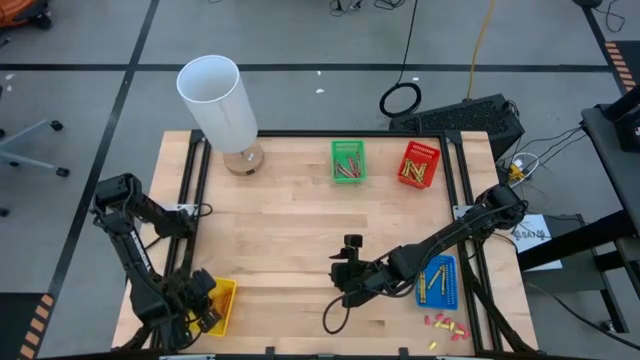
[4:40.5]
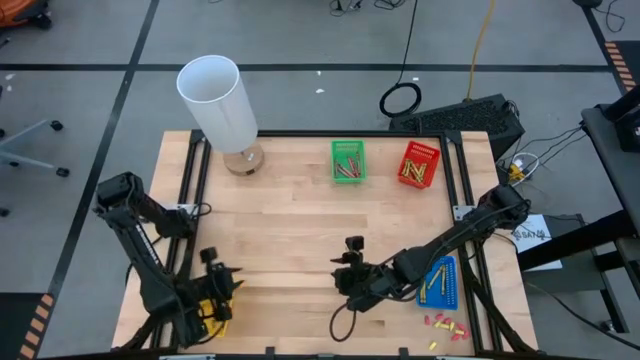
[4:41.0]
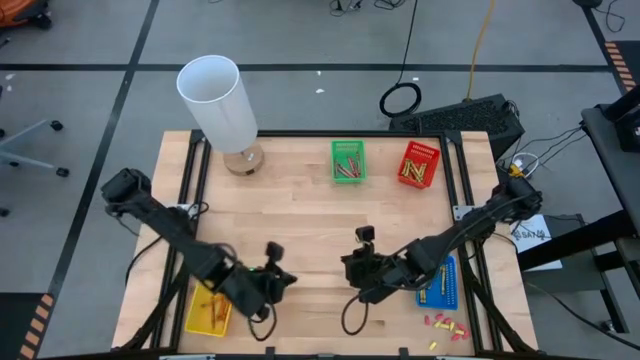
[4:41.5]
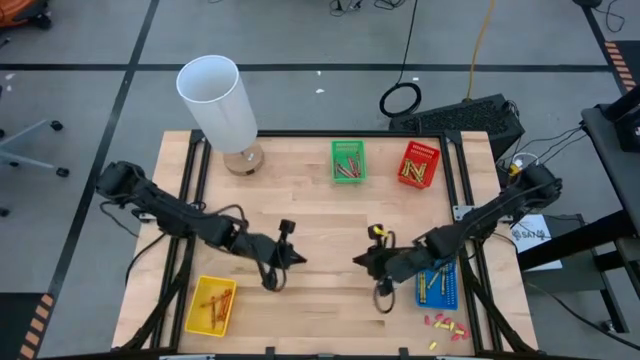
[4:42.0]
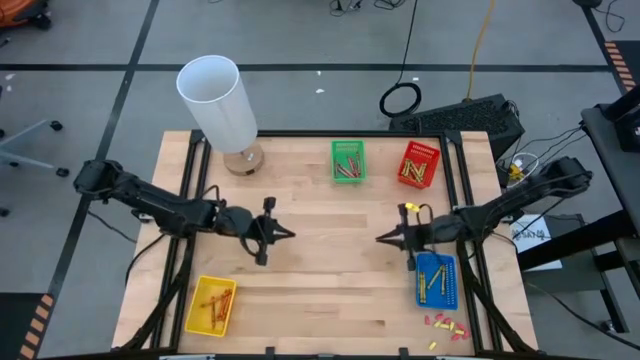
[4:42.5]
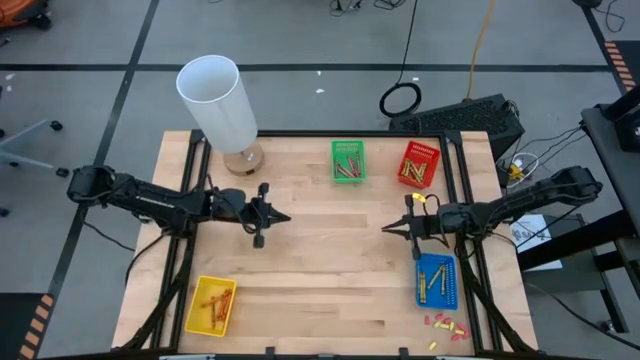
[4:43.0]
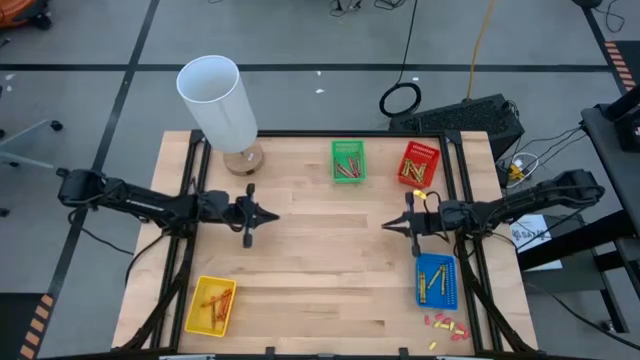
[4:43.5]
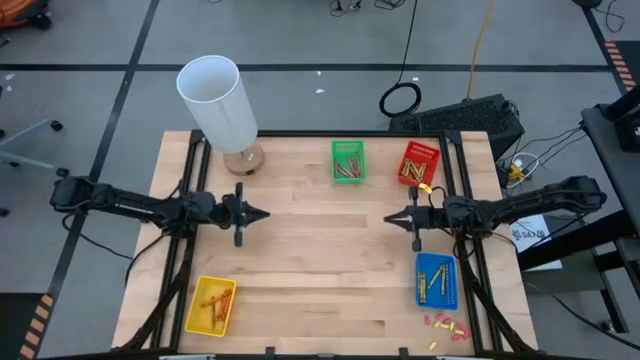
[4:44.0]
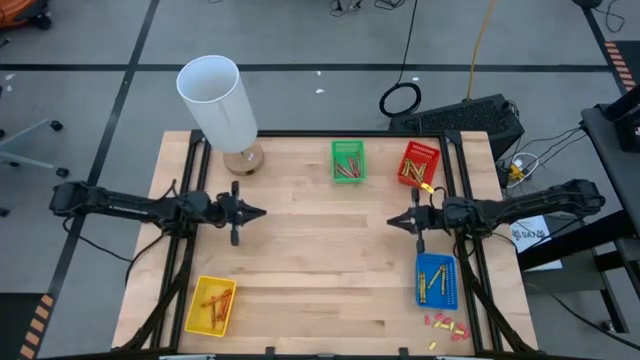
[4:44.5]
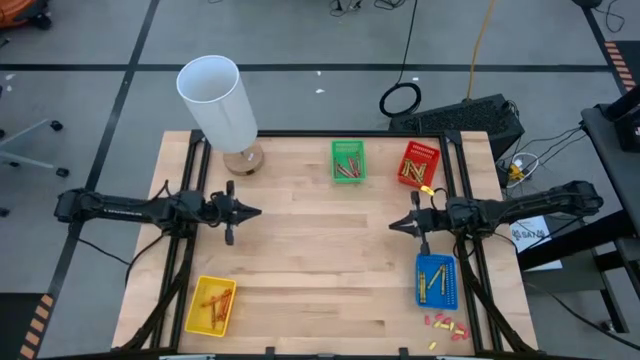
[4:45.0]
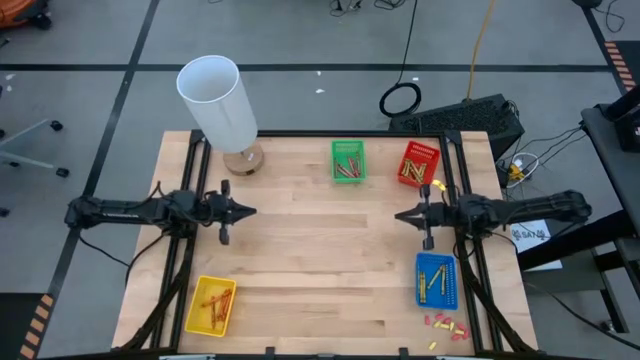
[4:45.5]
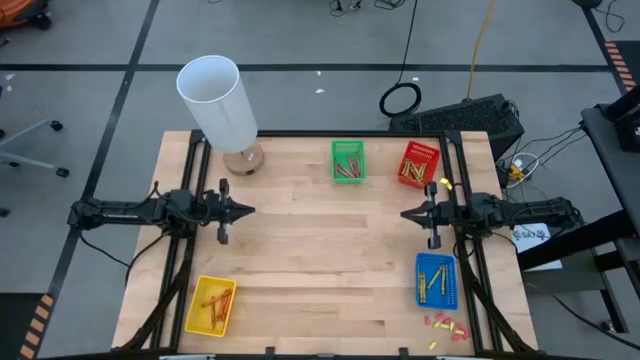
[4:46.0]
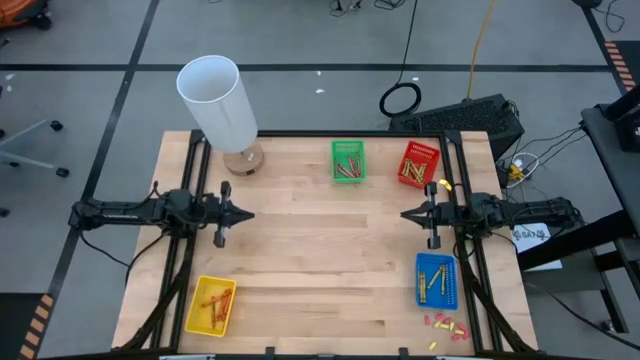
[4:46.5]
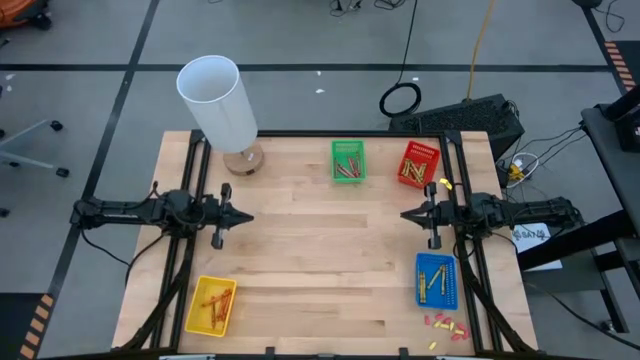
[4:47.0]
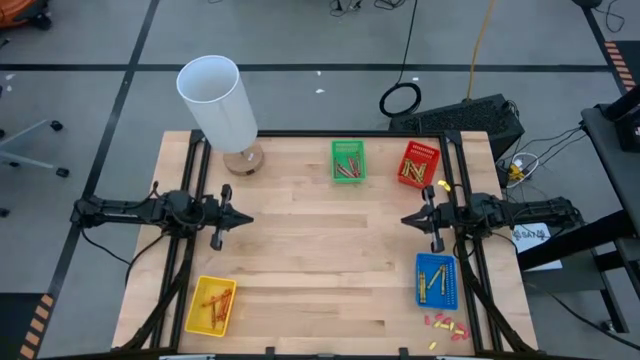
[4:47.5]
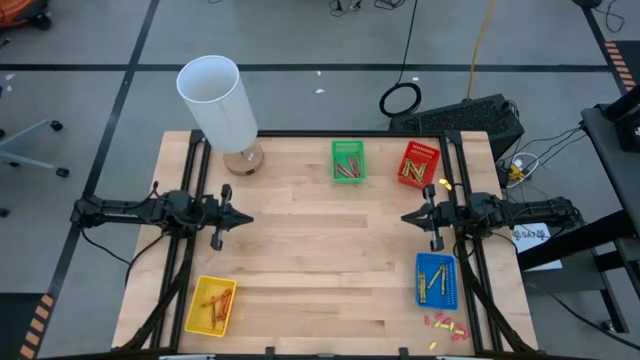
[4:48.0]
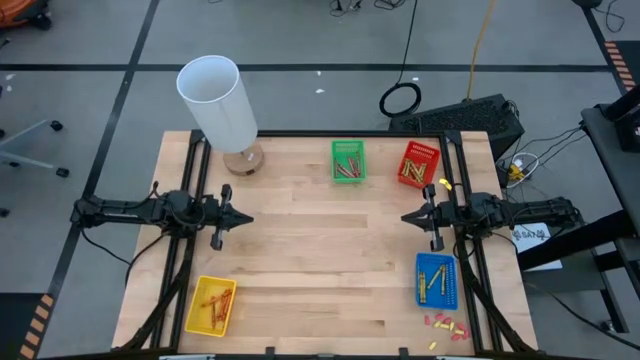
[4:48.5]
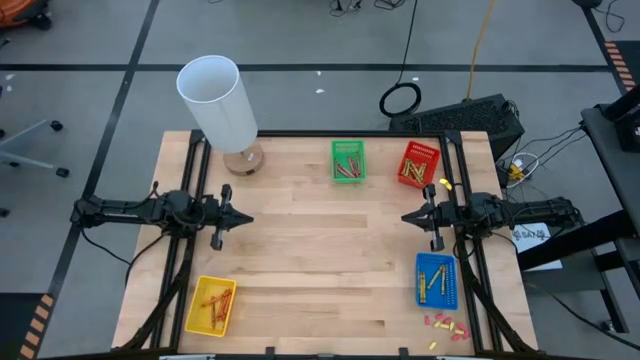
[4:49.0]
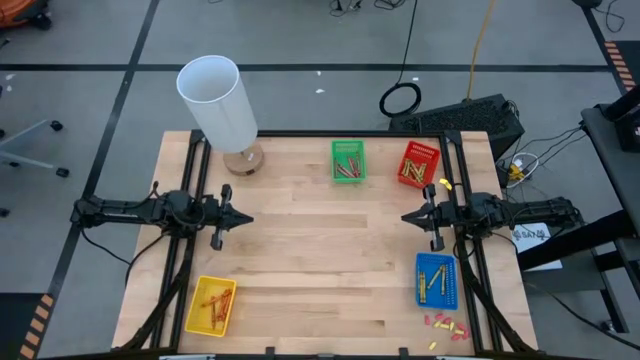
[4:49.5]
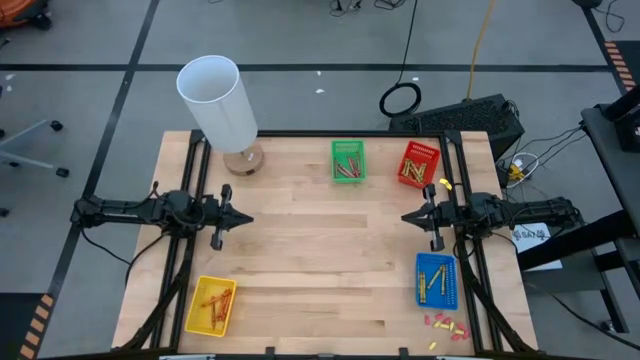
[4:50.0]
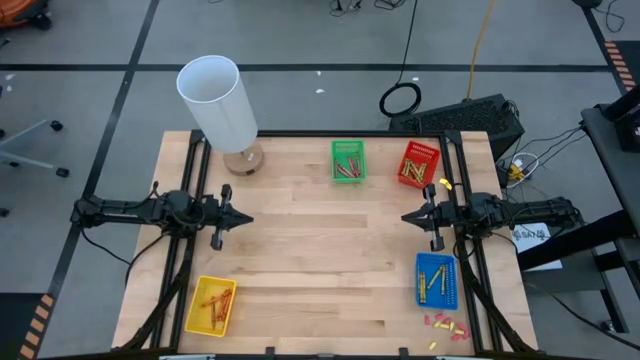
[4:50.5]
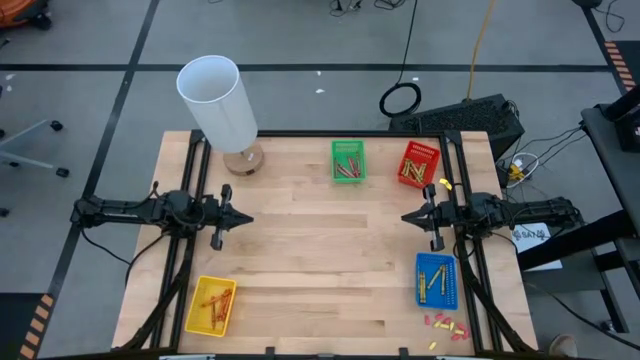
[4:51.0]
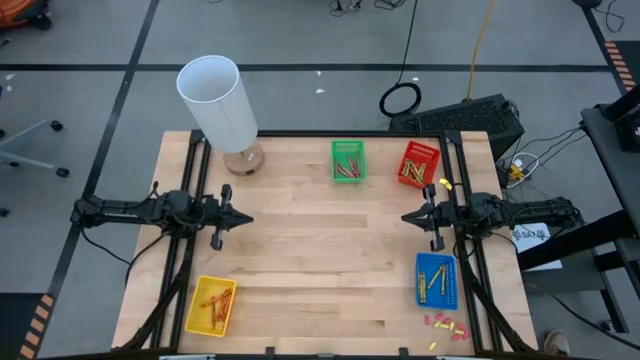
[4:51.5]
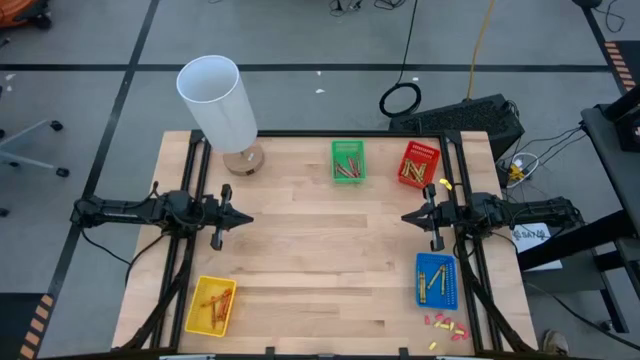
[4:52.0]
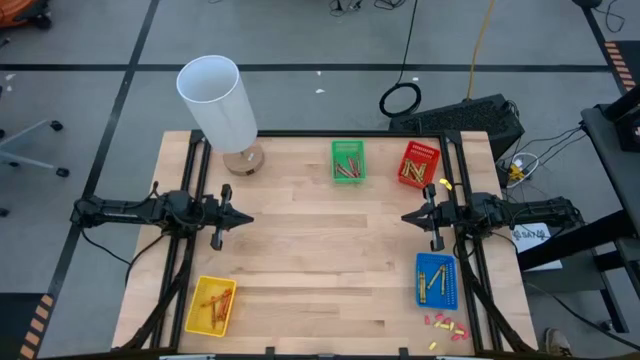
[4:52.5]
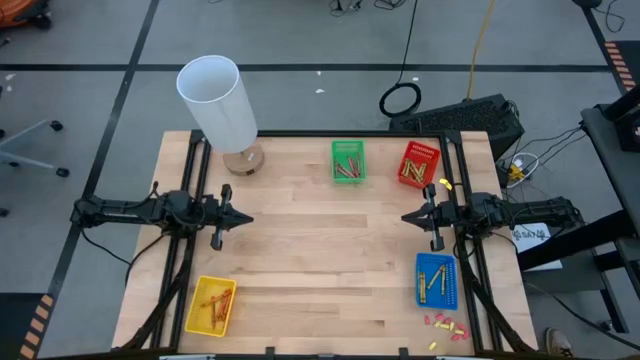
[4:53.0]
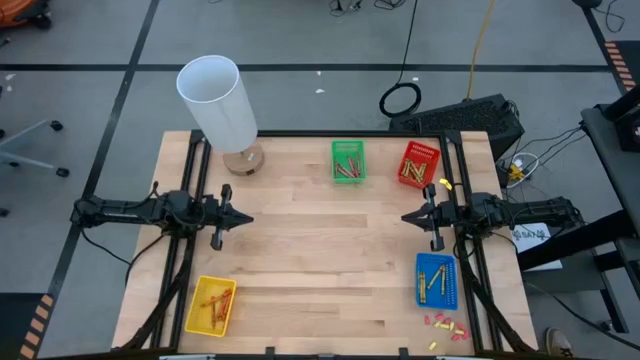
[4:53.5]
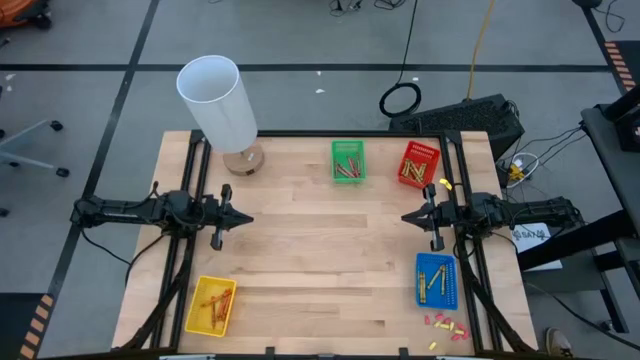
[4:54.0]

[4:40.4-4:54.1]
Task: Sort crayons
Return to Home Position

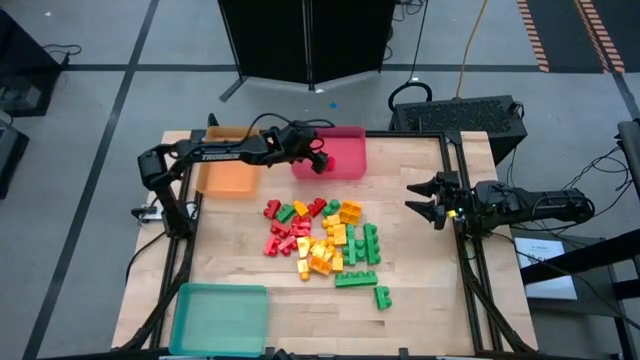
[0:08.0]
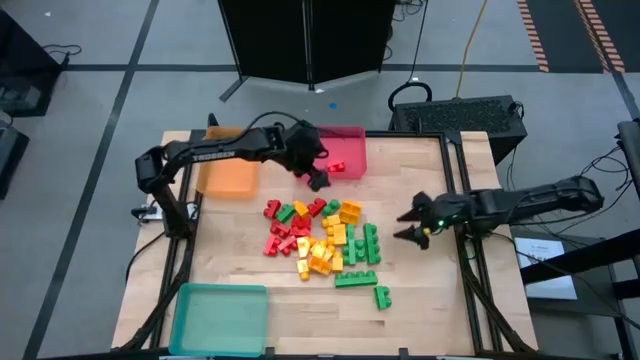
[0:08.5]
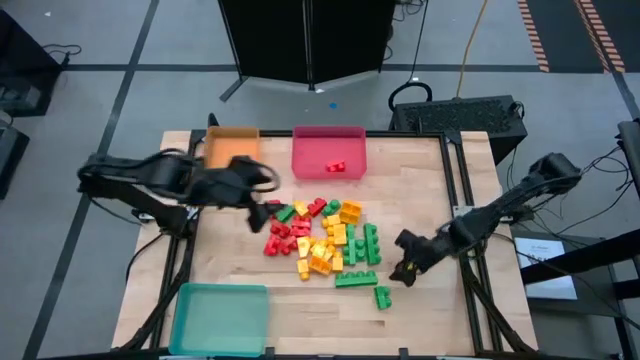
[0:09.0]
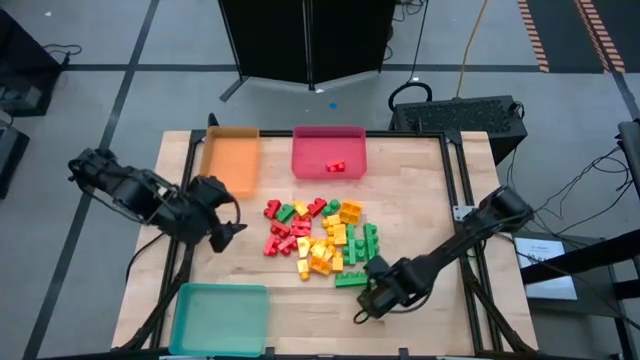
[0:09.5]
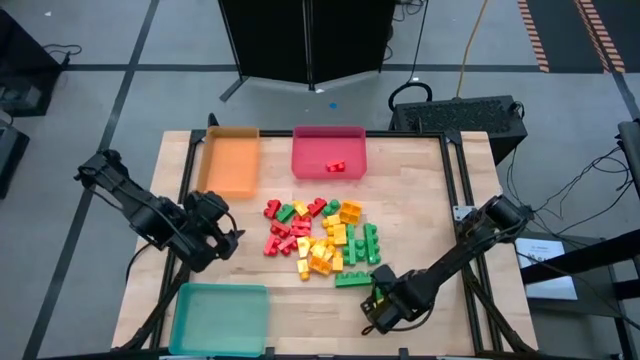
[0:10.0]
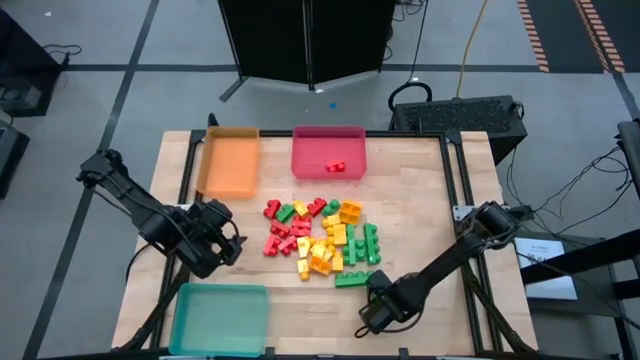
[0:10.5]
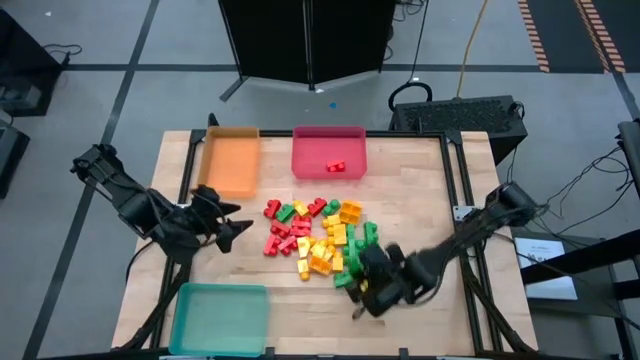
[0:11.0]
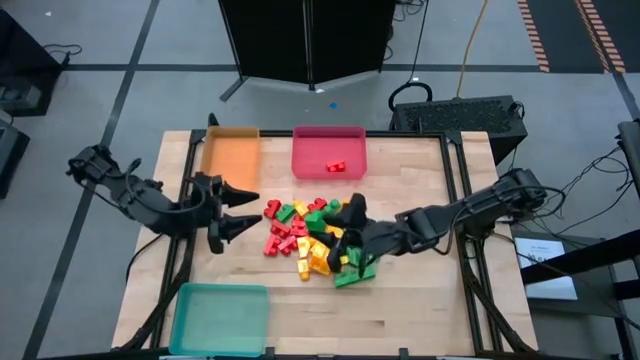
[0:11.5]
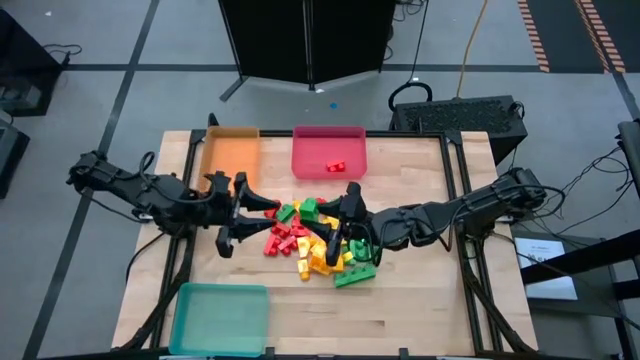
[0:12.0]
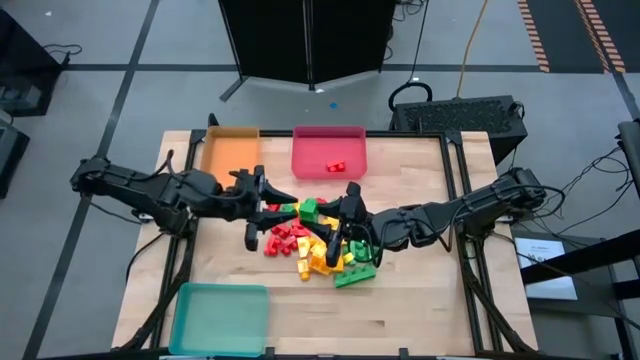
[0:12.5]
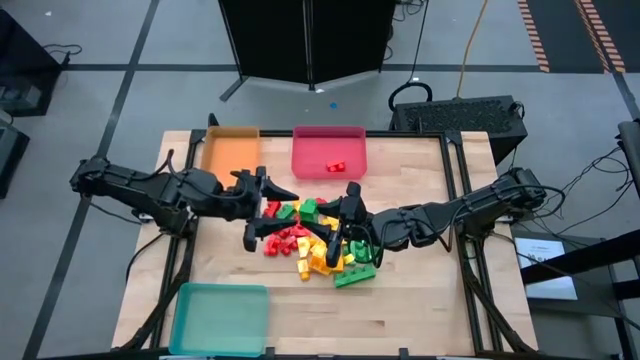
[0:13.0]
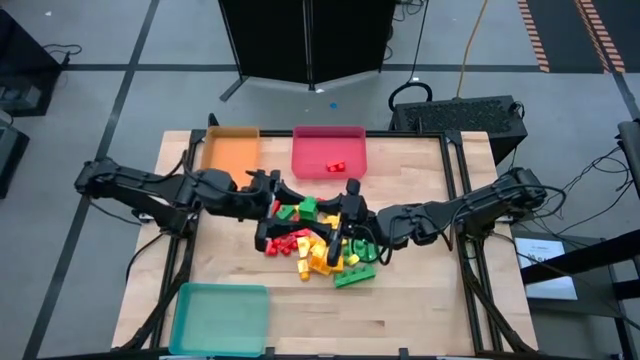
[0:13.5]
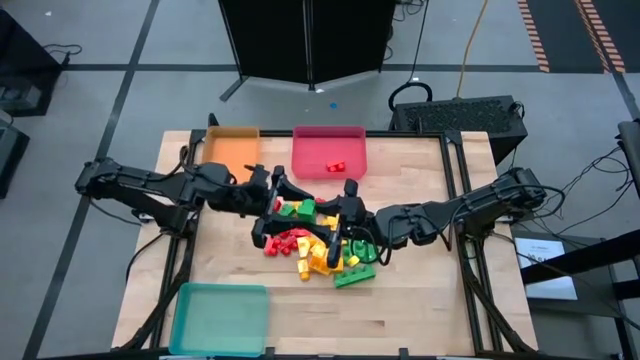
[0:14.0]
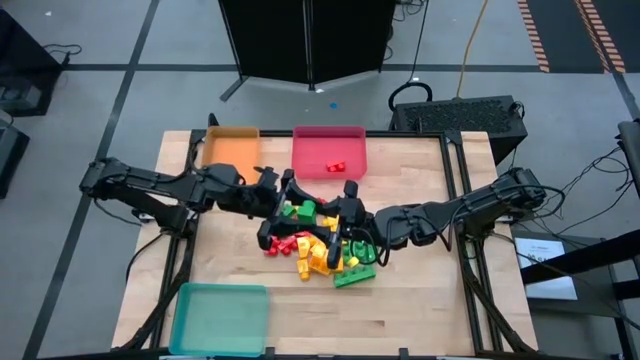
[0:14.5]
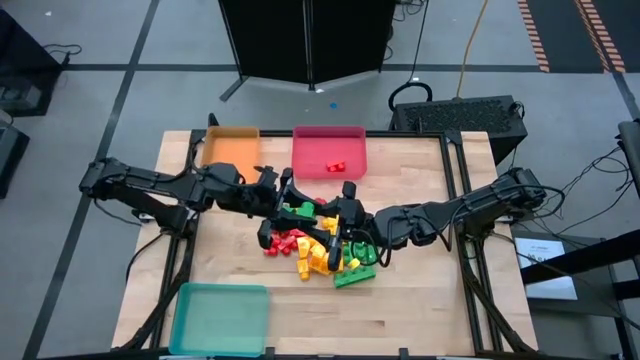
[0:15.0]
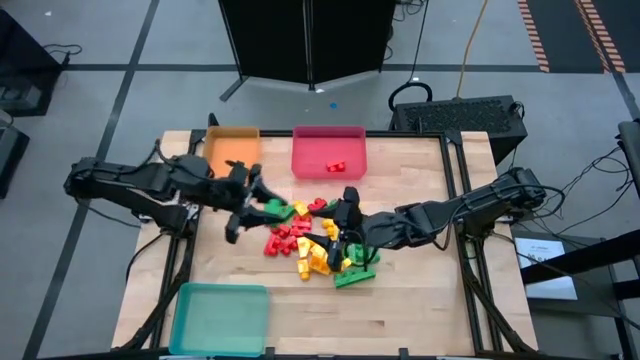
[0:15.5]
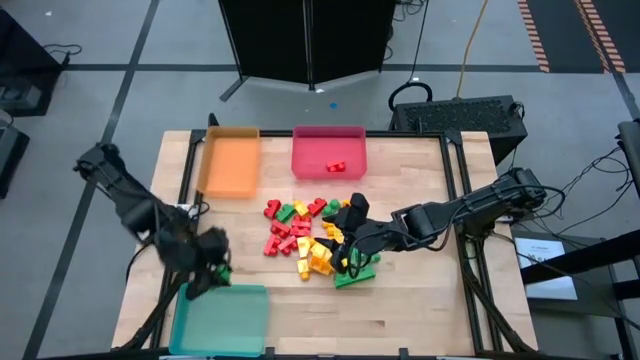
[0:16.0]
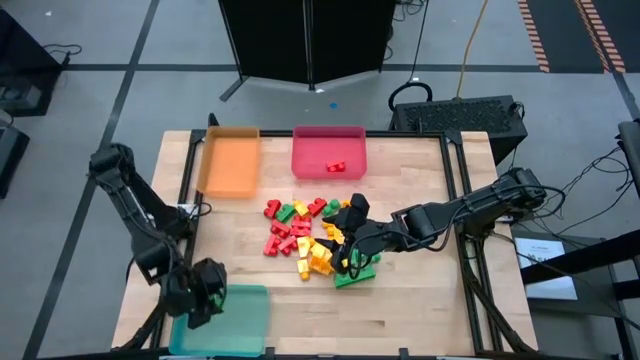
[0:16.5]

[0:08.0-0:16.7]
Task: Sort blocks
Put the green game piece into the blue bin
